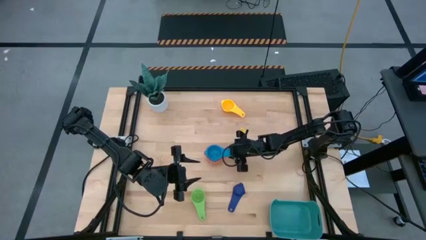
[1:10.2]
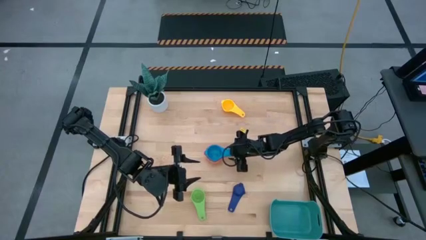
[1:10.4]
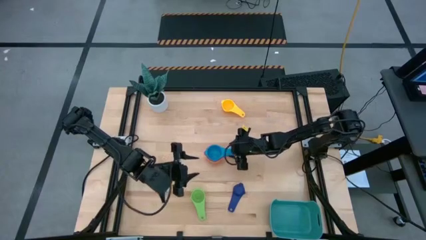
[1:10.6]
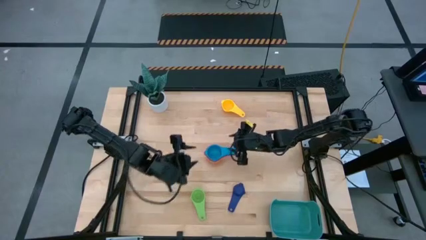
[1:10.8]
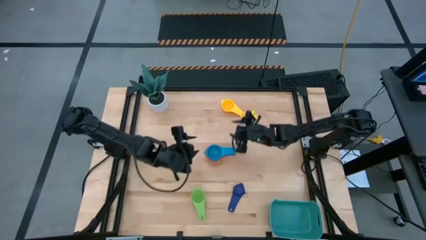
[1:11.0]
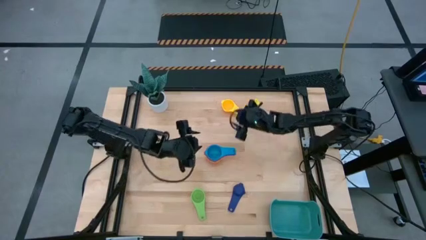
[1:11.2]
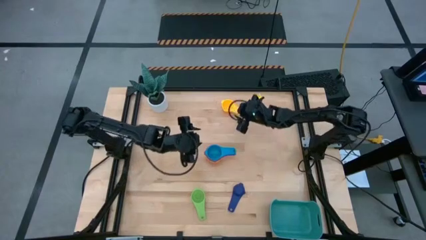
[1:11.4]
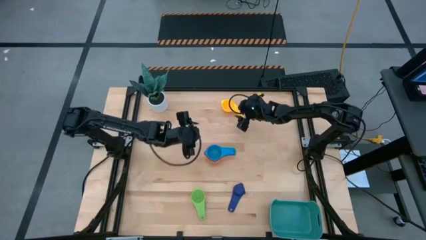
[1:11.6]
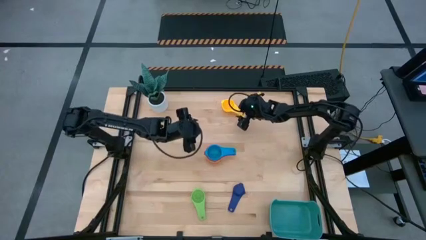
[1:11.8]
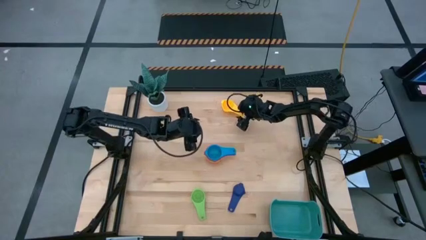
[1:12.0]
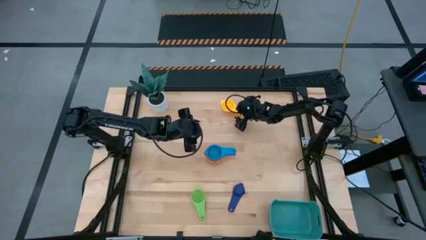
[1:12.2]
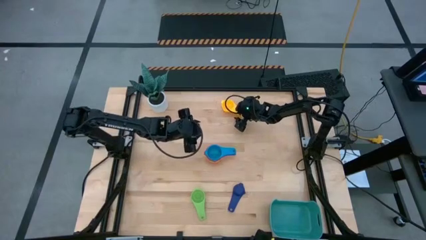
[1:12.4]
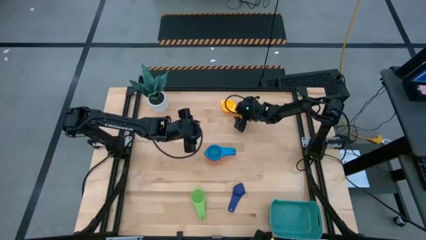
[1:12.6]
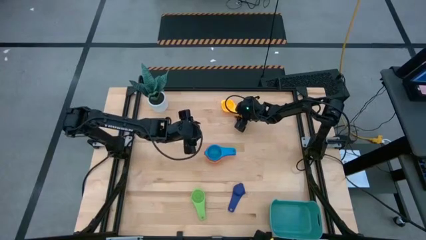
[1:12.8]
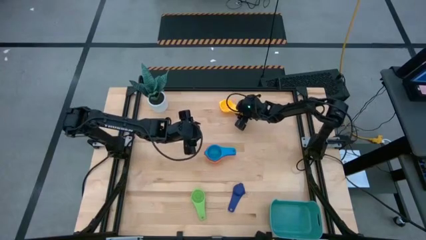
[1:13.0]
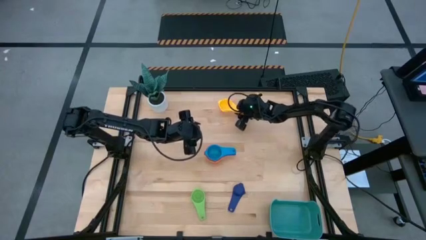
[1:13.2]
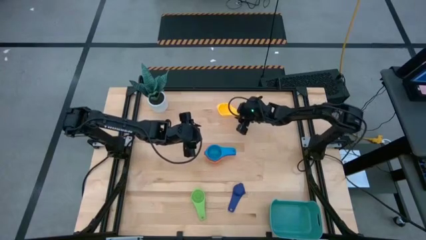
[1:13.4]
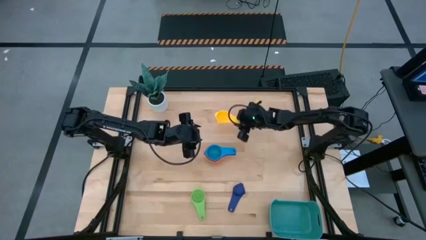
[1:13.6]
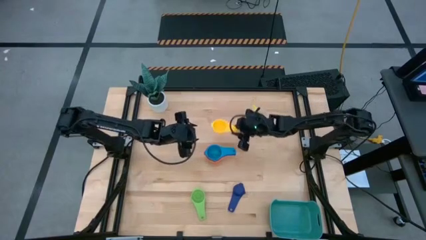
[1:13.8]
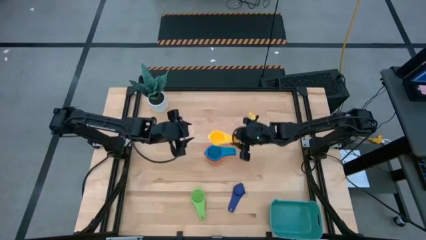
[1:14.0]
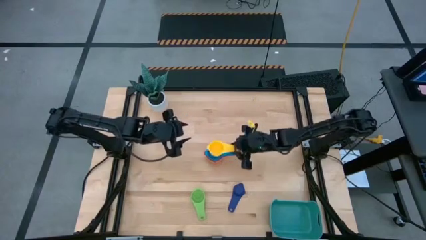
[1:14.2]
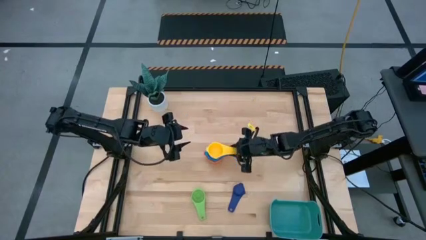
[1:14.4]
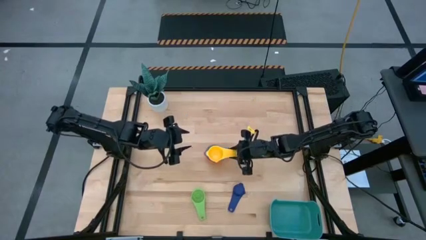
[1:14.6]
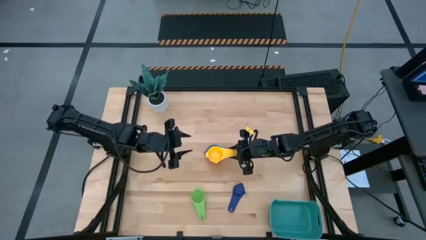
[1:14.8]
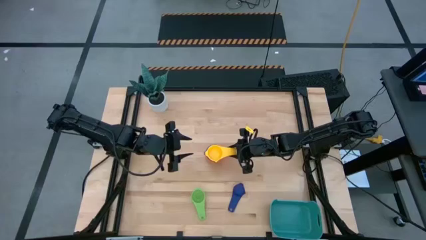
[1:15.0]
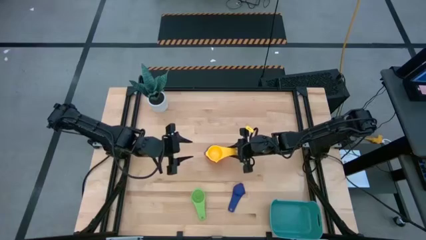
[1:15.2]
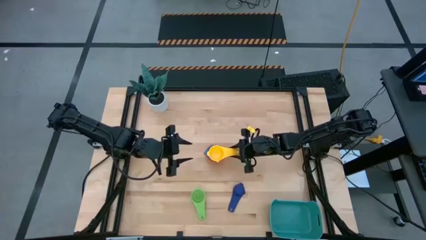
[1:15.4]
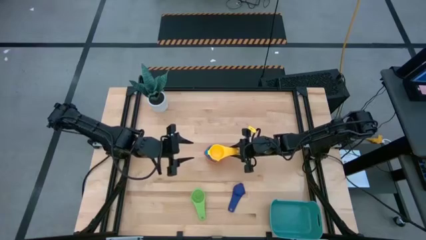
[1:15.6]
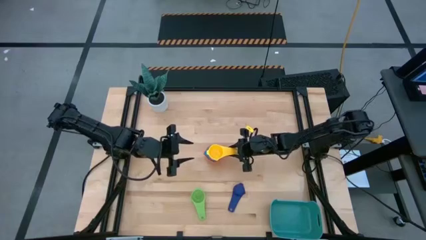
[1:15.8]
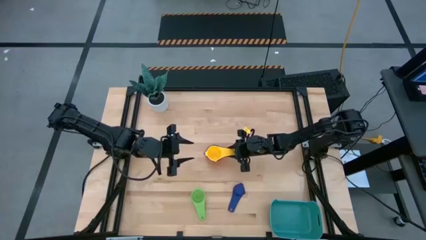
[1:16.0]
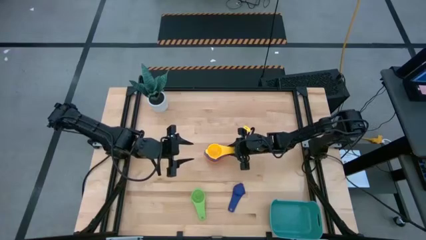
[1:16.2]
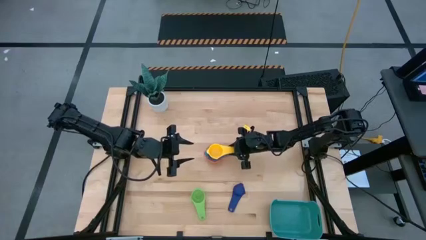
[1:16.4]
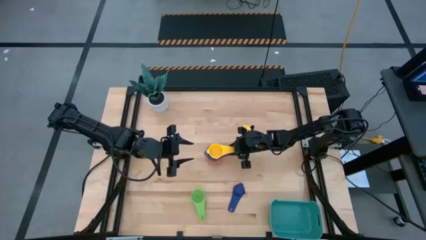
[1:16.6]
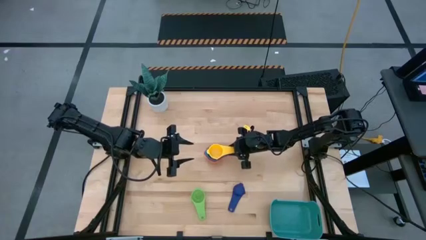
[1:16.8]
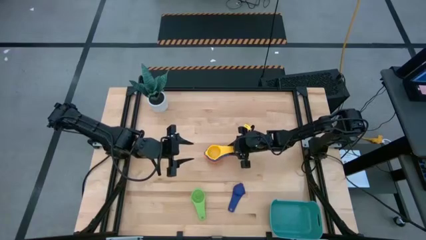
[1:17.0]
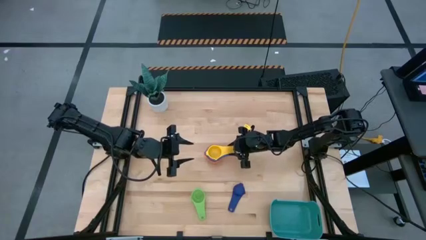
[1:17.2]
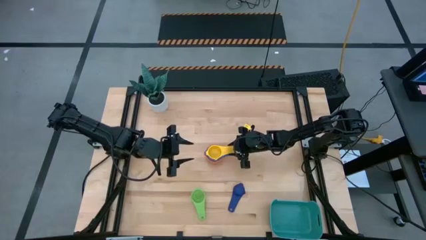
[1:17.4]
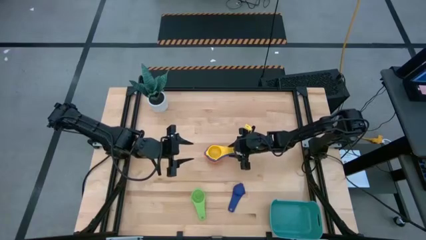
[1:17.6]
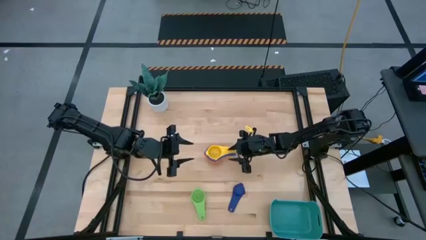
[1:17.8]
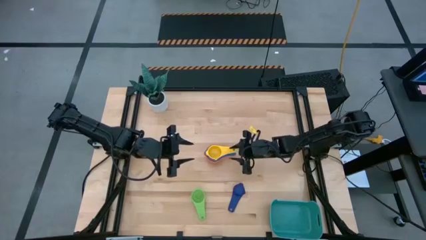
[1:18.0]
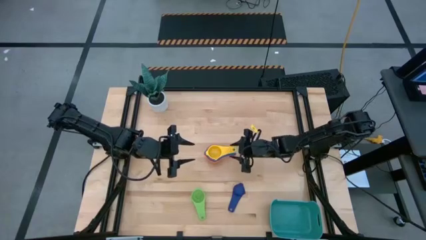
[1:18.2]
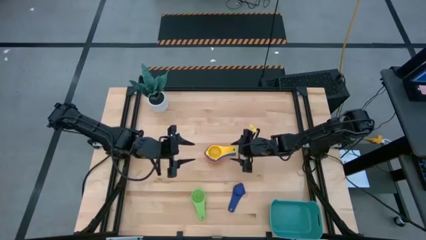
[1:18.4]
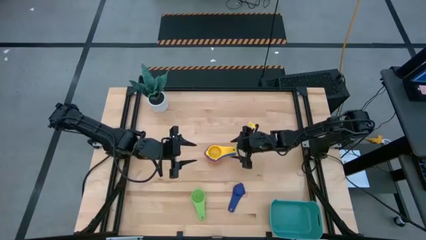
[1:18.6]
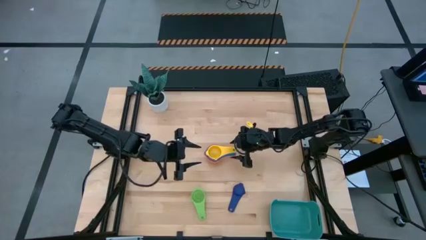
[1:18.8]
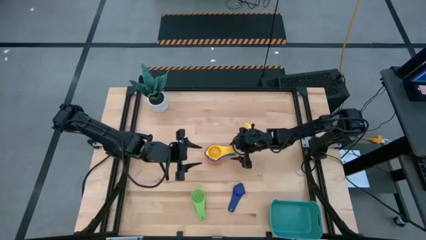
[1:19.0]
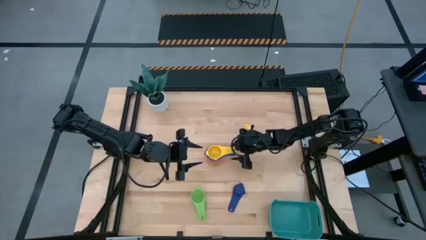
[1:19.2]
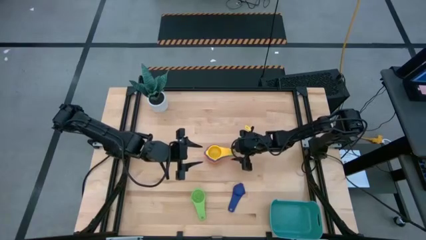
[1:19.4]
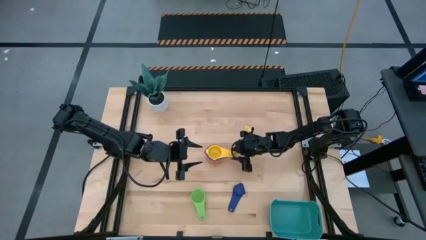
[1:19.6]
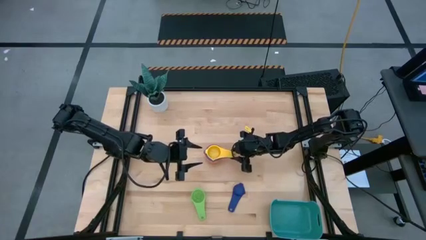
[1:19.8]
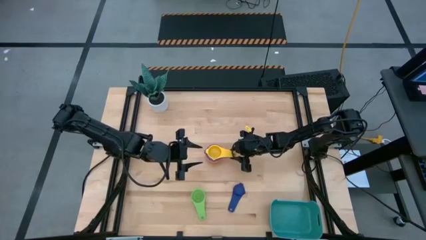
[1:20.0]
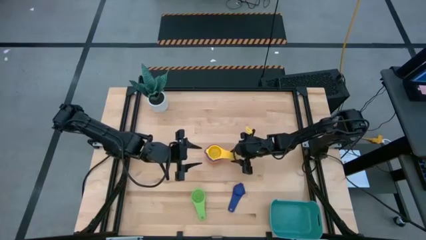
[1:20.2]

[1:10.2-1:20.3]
Task: Nest measuring cups in basket
Stack the yellow measuring cup on top of the light blue measuring cup

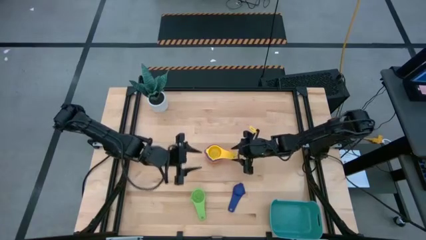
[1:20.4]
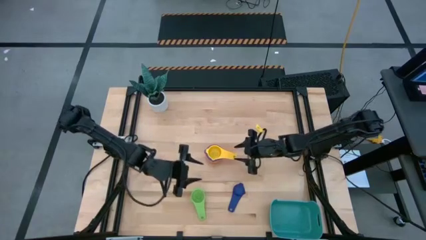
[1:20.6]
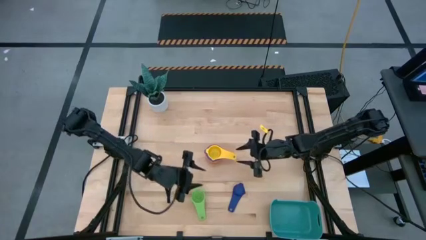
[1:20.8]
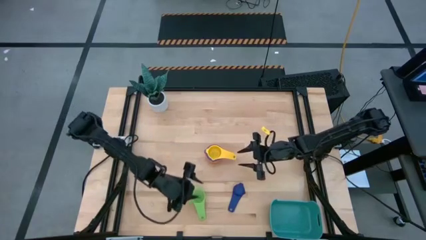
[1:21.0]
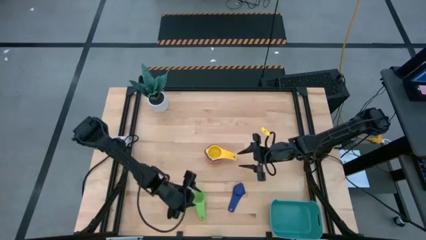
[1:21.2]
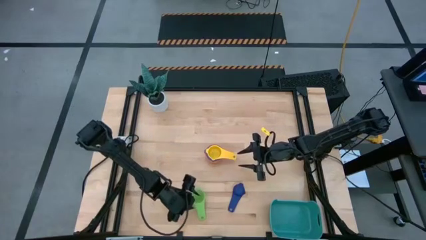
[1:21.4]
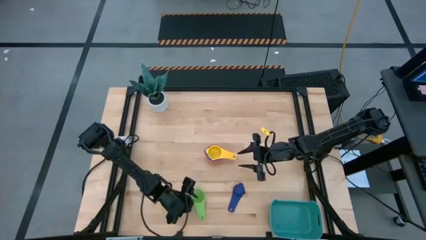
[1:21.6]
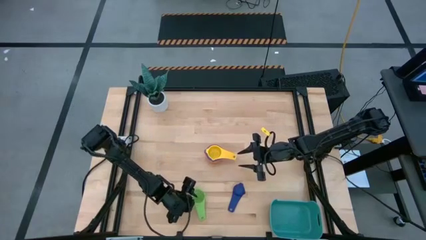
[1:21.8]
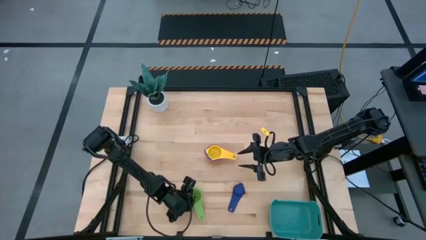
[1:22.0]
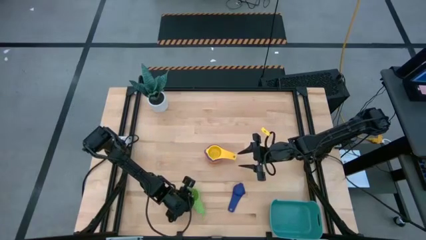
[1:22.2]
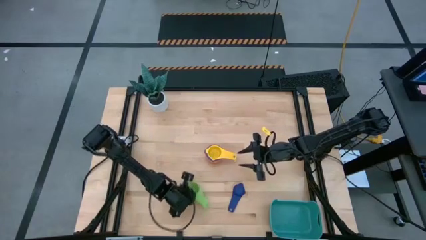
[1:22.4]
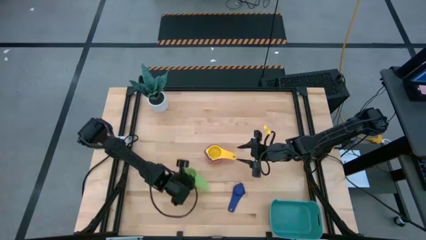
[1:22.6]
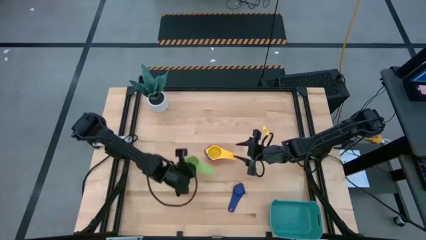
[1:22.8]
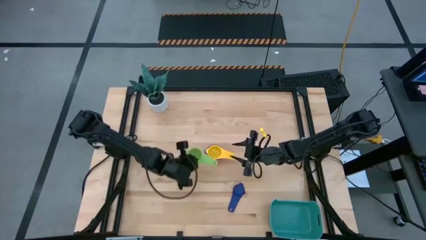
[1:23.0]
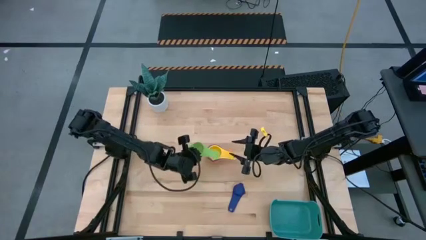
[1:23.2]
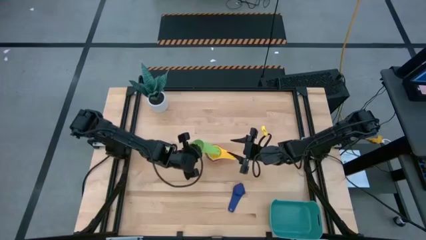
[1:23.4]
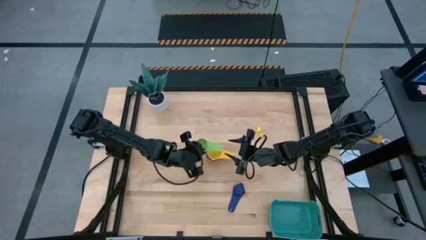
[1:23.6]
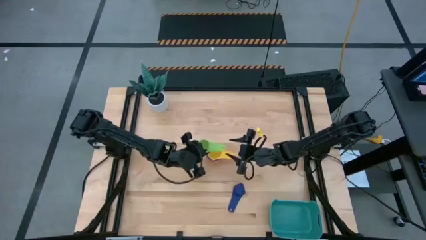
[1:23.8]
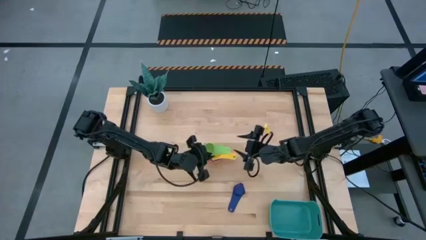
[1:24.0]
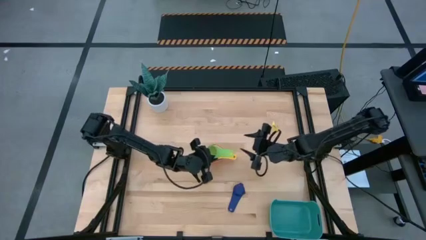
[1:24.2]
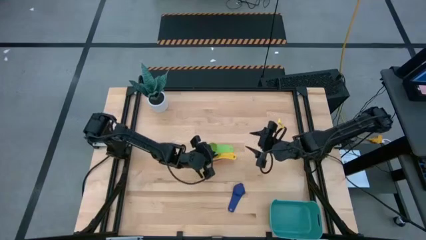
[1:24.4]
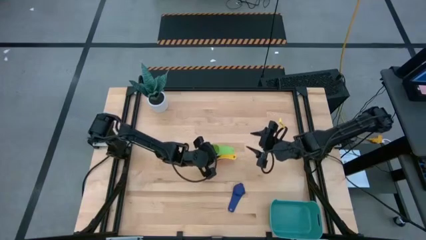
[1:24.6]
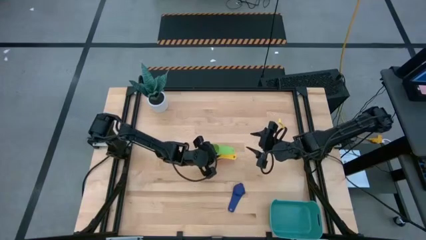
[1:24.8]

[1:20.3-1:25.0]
Stack the light green measuring cup on top of the yellow measuring cup
